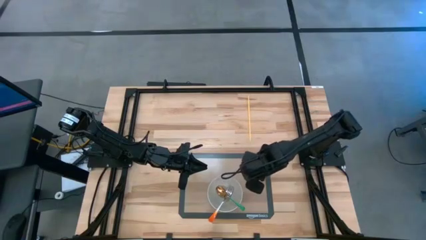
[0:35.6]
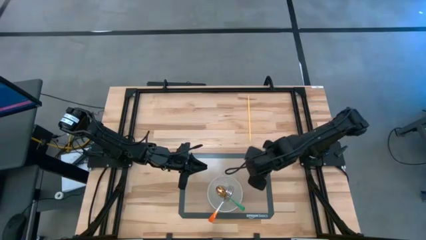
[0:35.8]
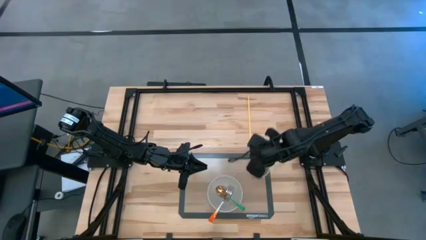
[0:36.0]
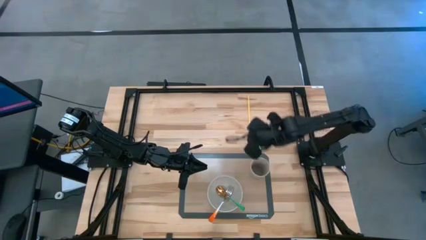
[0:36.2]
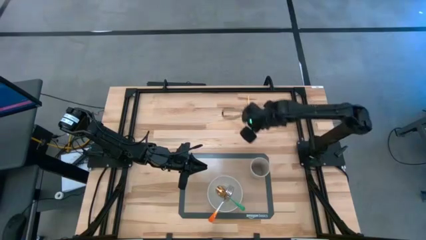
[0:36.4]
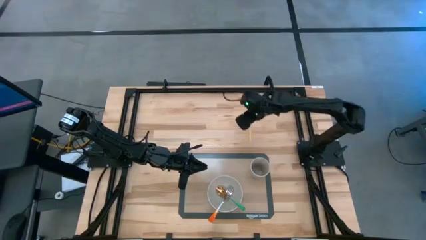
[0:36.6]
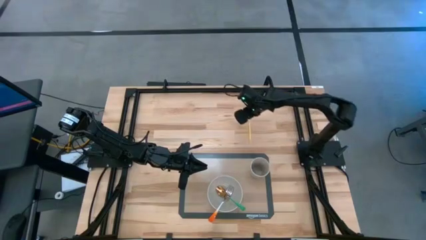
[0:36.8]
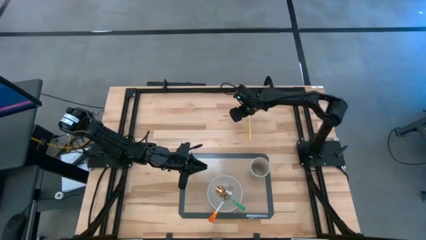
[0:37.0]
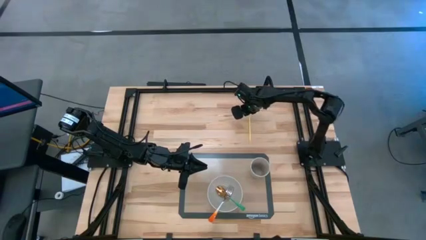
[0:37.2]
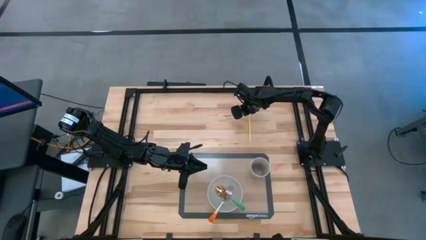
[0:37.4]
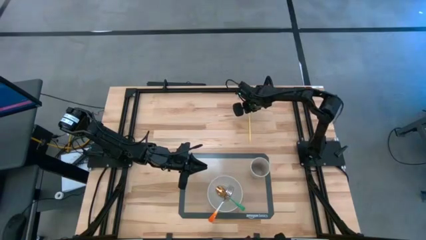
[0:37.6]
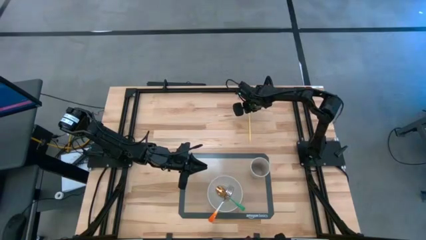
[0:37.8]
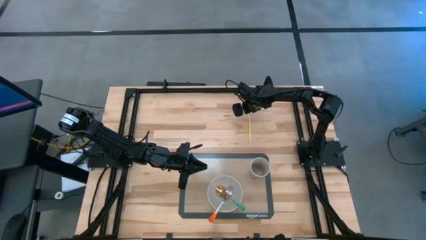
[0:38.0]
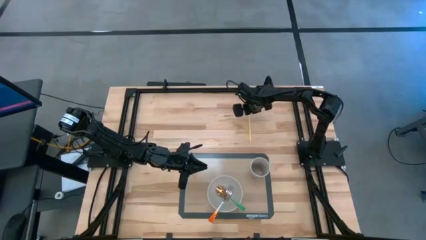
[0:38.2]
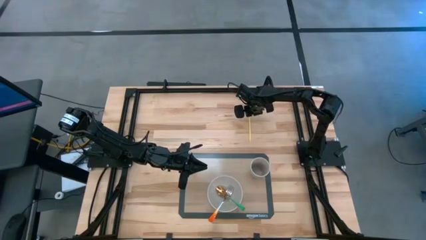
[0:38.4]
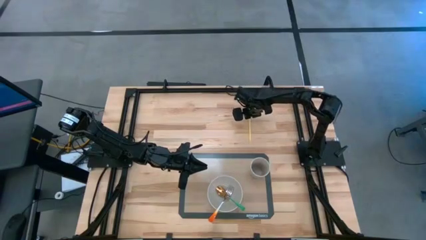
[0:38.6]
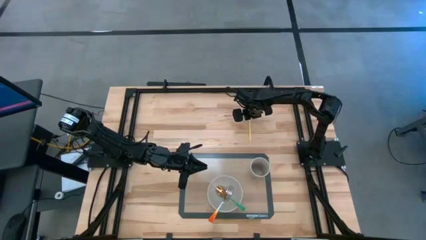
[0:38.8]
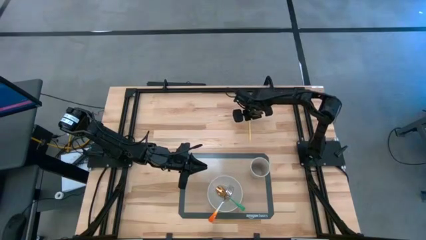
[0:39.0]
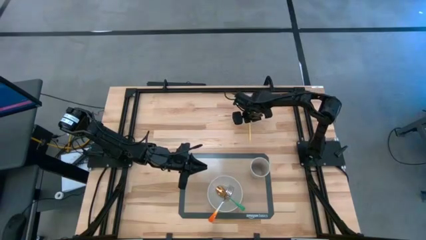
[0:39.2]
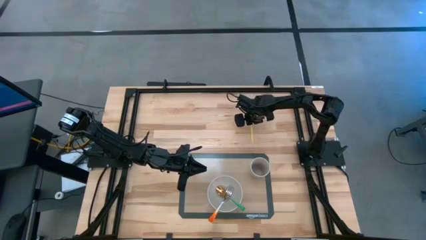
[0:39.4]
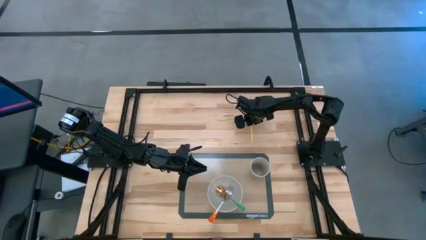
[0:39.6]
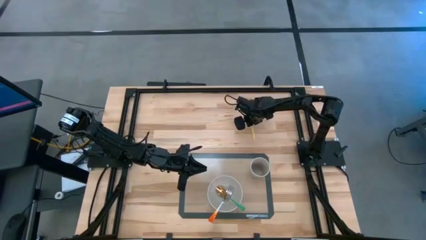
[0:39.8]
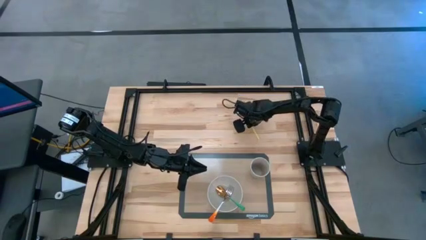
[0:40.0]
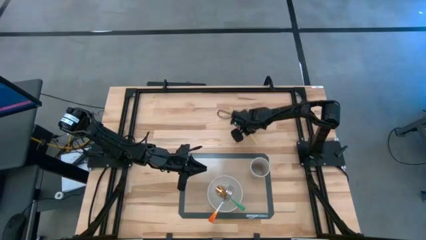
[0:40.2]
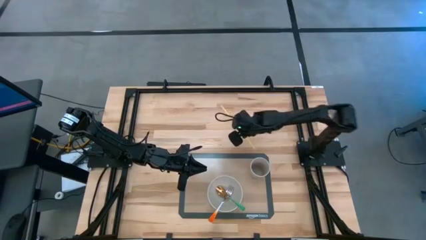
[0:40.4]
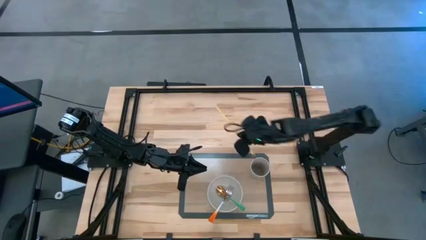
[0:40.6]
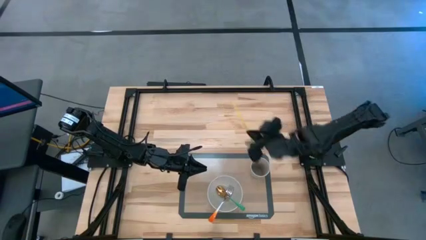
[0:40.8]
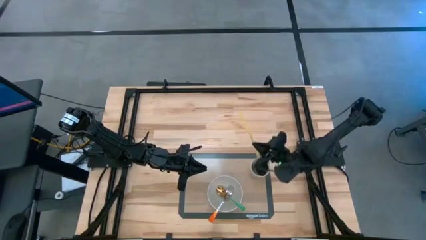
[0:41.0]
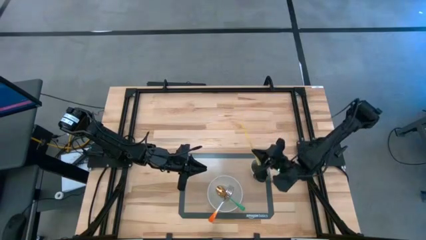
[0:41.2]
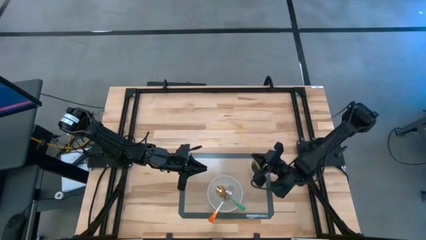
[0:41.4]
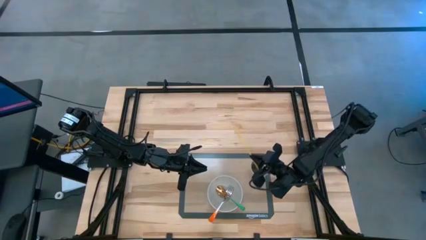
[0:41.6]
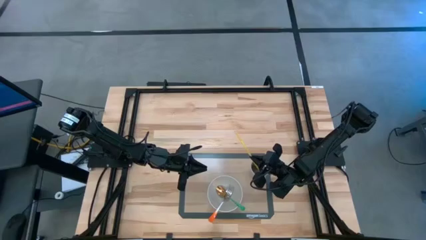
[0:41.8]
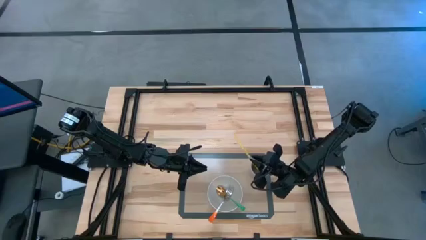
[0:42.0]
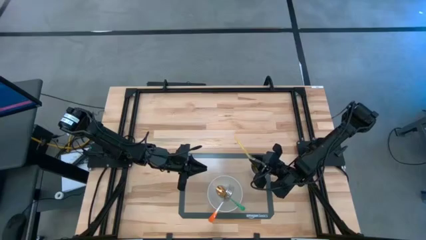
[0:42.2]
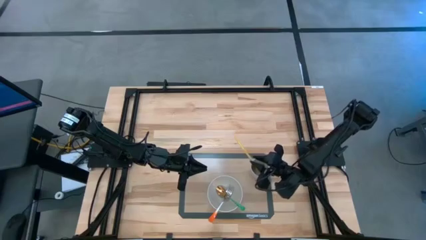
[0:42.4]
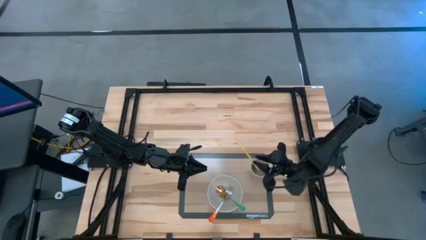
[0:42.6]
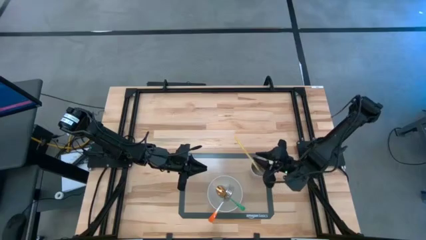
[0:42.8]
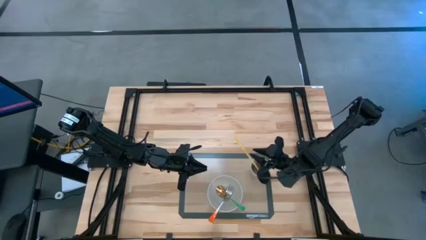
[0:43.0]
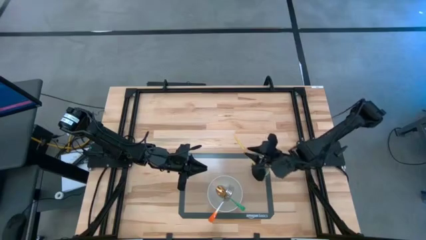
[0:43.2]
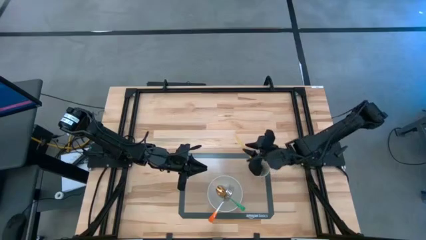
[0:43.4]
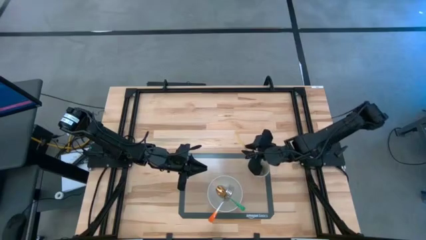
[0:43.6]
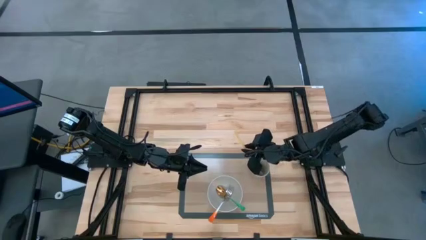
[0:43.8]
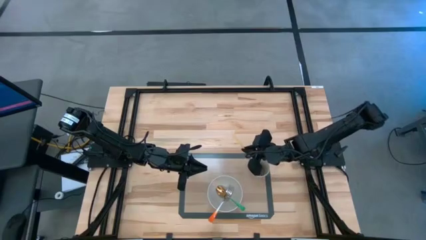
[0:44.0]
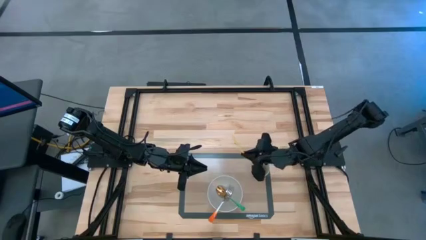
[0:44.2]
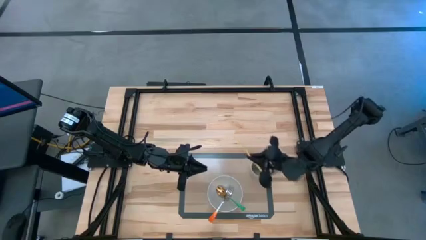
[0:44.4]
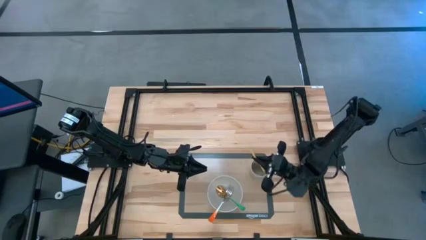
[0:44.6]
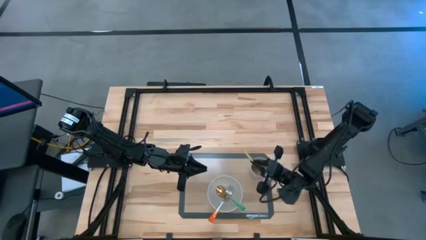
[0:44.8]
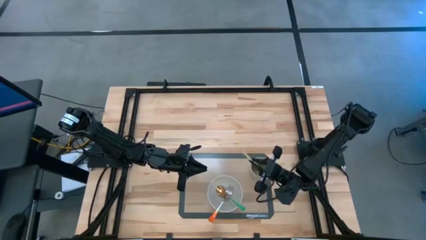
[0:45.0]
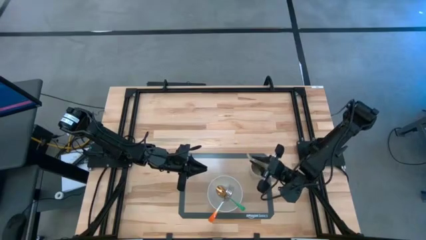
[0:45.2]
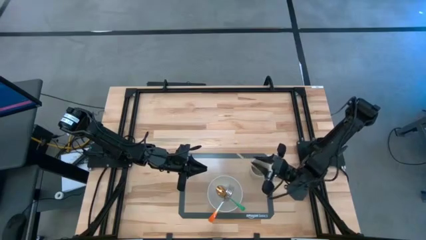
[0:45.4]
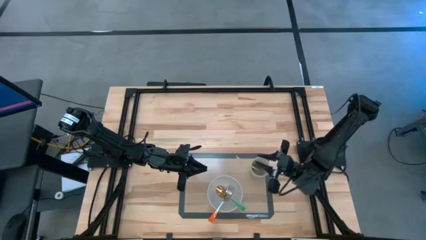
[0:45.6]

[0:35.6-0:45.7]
Task: Pick & Place Utensil
Put the yellow straw into the gray cup on the brown mat

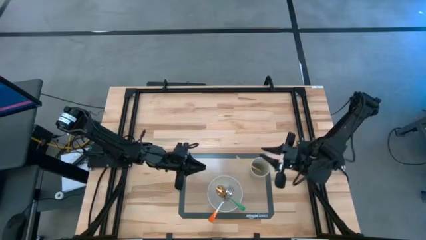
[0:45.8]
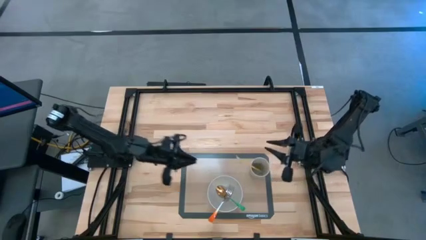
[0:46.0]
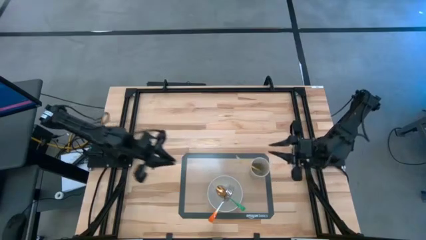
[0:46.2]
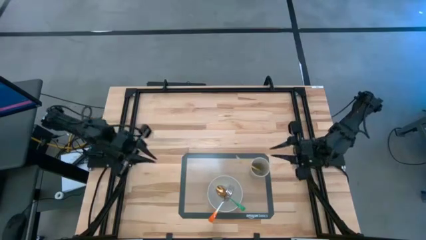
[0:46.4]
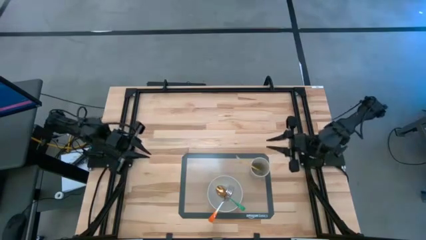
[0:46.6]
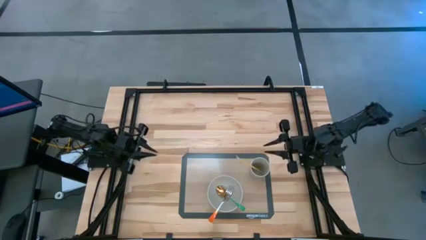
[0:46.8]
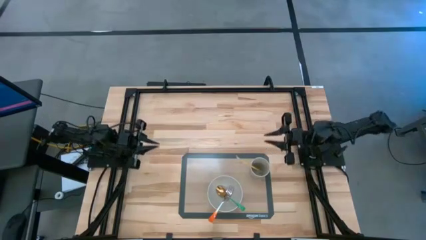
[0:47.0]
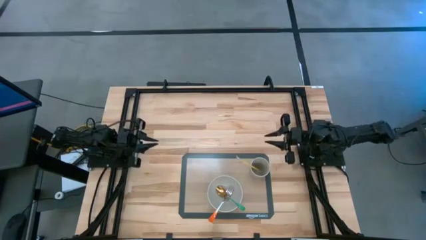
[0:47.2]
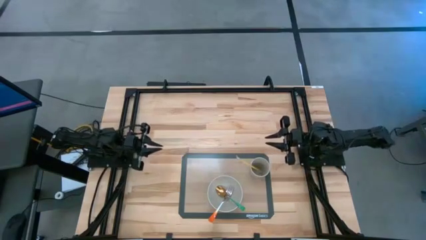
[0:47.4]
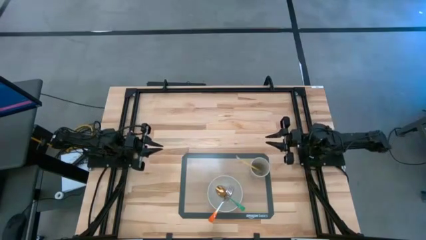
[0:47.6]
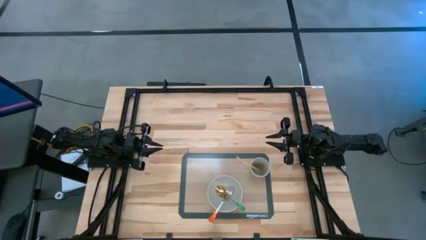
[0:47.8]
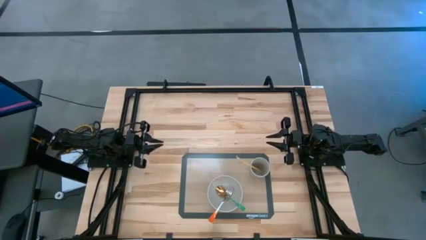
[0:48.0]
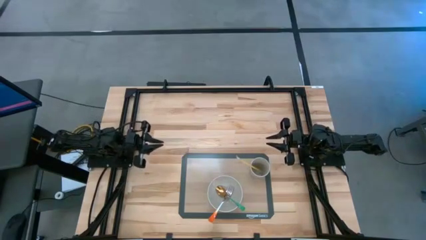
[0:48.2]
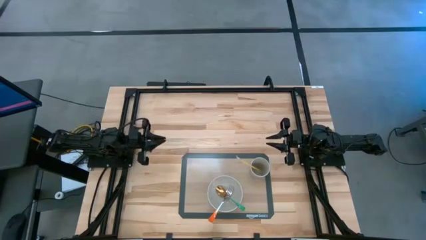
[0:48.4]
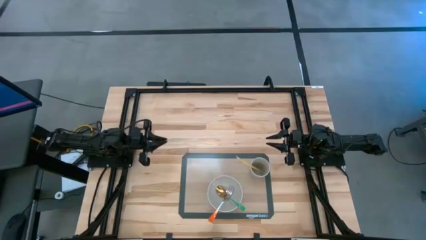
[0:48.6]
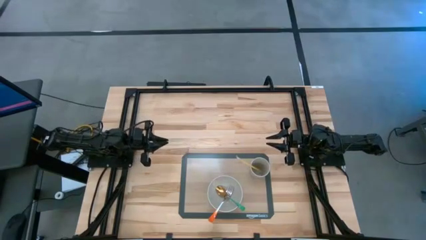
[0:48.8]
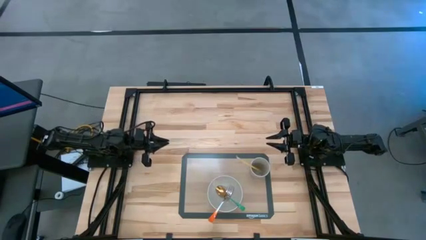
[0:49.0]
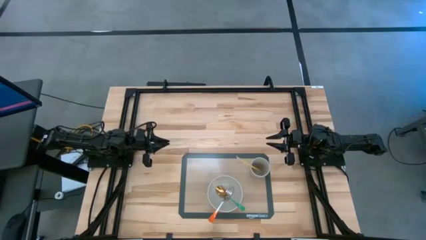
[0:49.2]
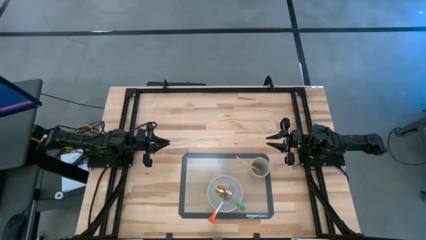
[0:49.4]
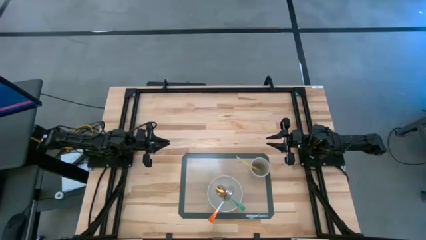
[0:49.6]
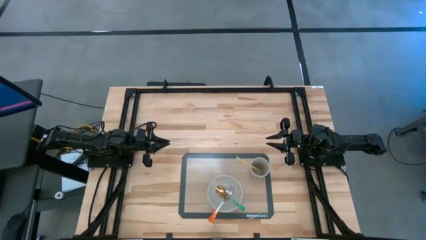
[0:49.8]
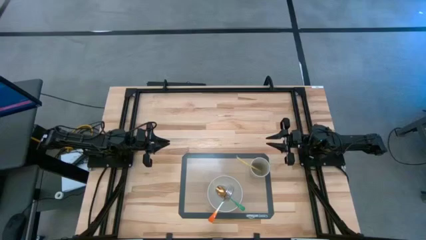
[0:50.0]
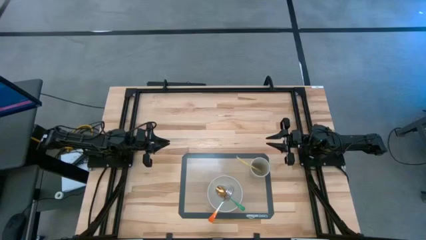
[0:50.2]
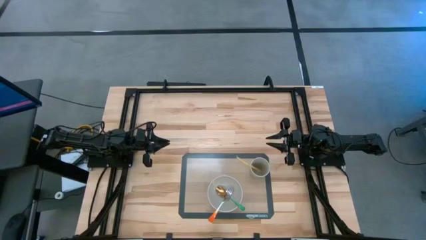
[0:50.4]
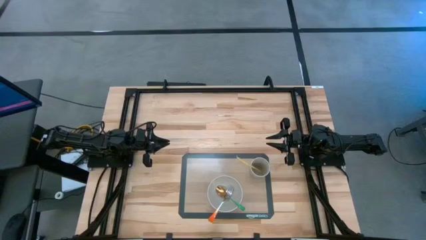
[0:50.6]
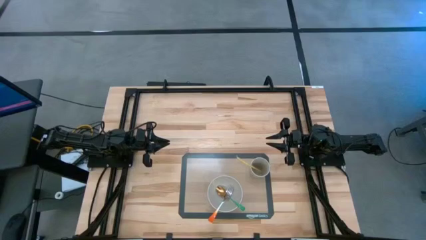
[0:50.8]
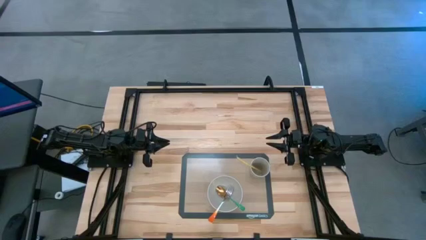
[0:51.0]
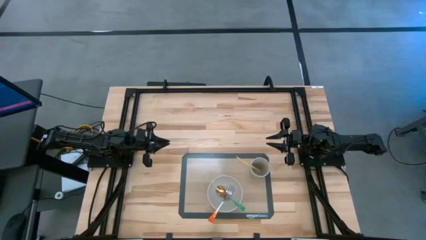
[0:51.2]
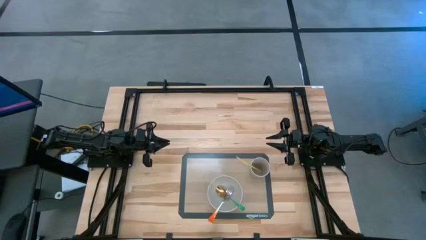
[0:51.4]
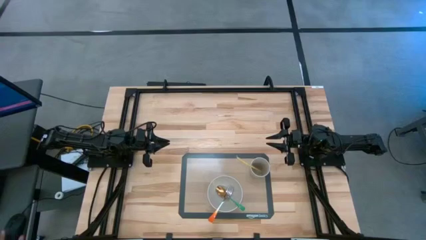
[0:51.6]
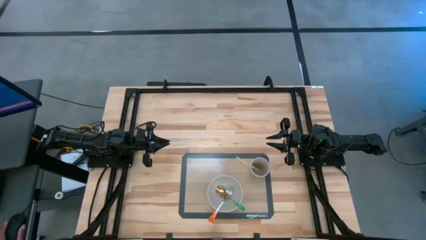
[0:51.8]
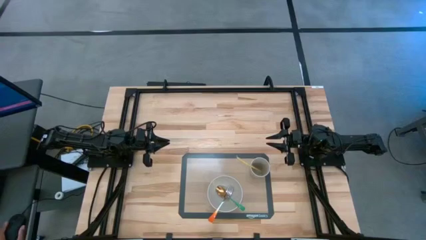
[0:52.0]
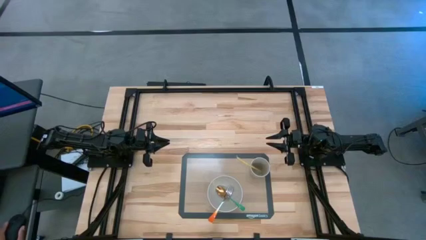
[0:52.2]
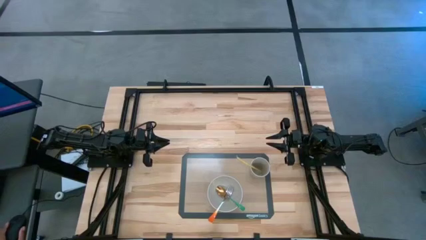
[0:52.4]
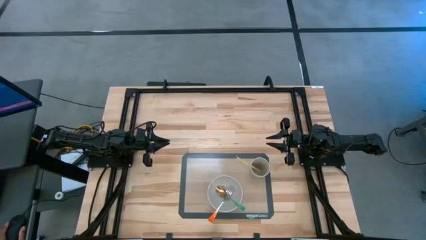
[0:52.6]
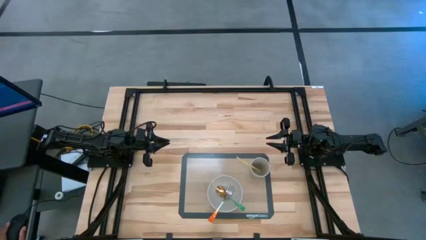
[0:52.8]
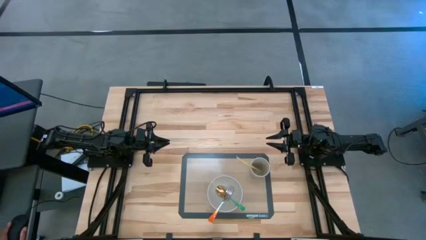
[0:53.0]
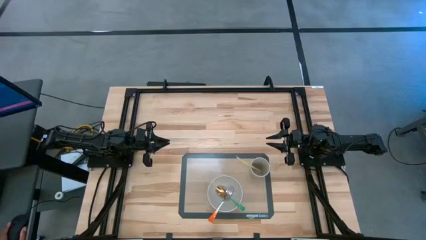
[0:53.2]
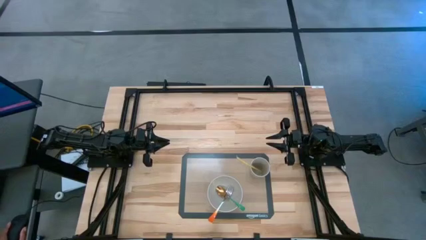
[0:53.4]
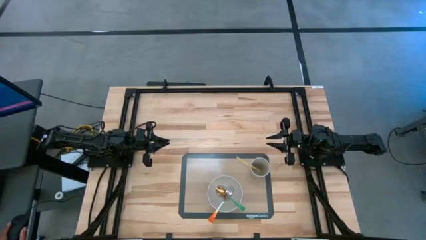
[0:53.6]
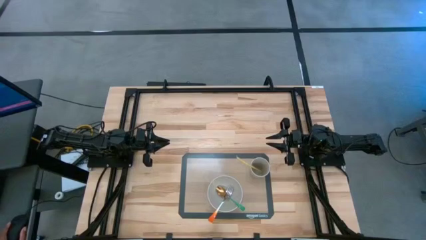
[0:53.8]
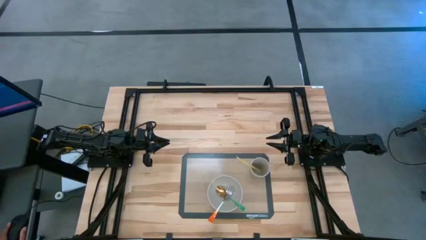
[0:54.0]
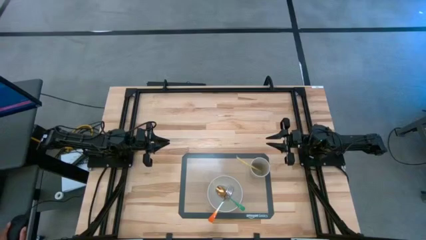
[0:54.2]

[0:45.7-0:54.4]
Return to Home Position
